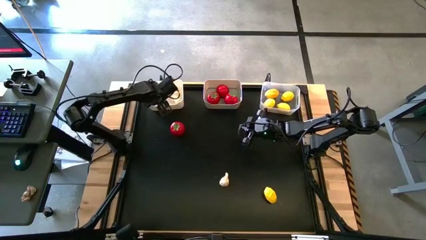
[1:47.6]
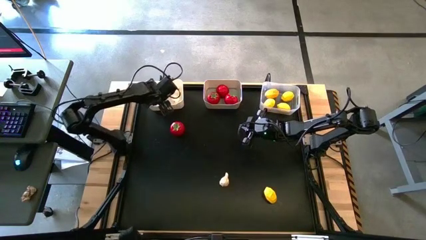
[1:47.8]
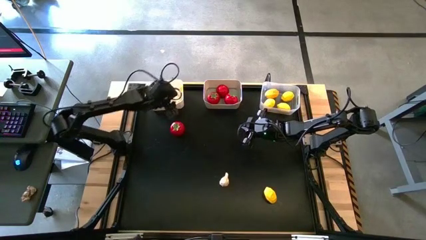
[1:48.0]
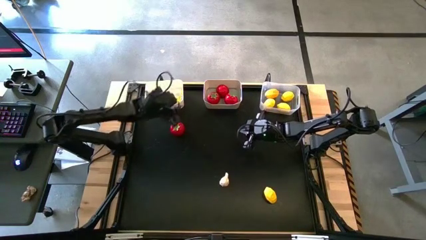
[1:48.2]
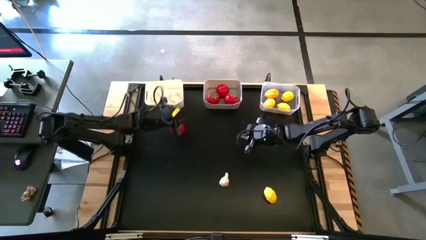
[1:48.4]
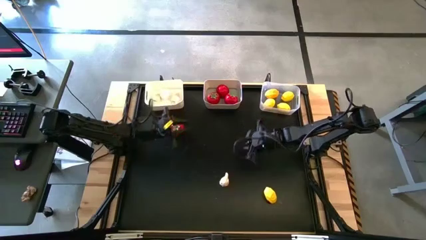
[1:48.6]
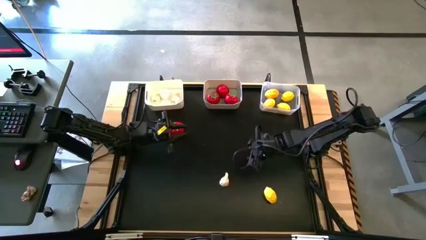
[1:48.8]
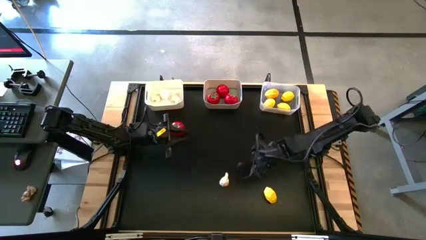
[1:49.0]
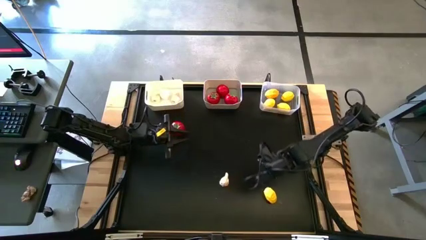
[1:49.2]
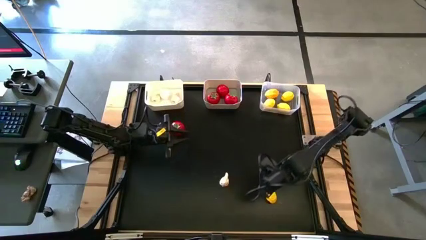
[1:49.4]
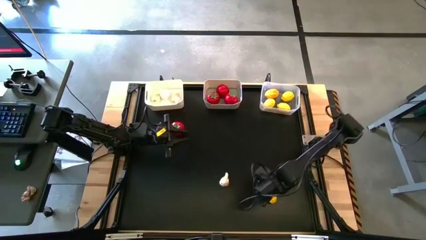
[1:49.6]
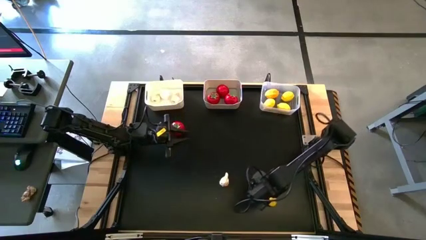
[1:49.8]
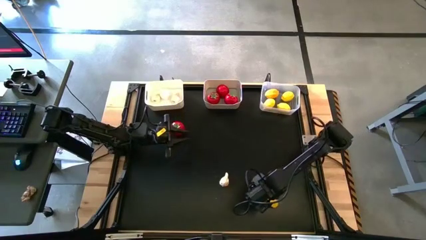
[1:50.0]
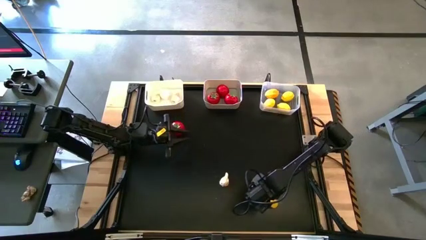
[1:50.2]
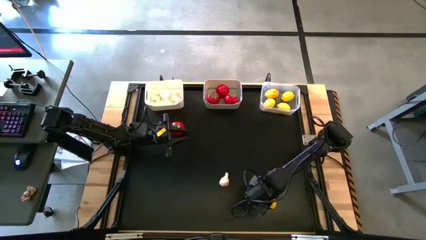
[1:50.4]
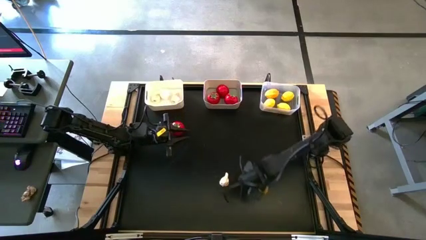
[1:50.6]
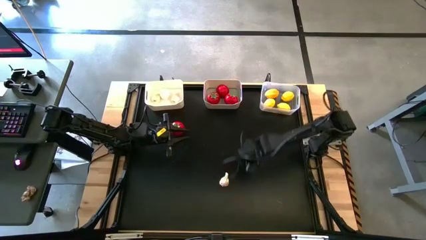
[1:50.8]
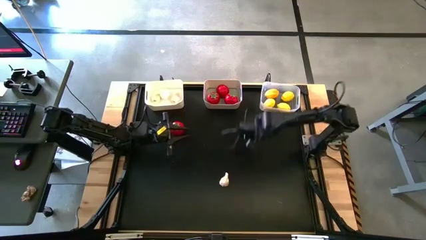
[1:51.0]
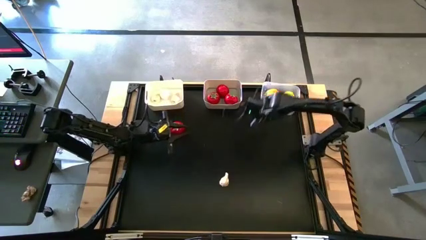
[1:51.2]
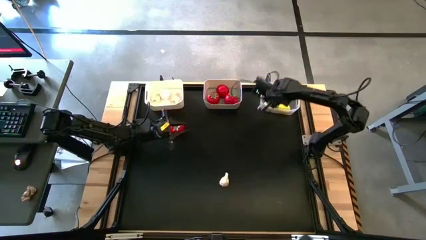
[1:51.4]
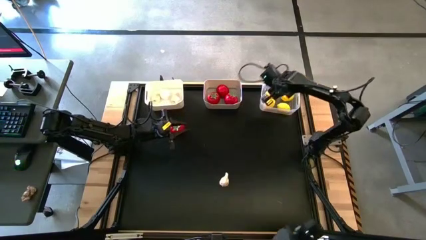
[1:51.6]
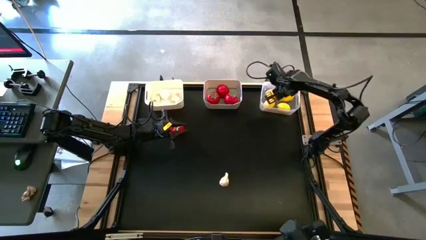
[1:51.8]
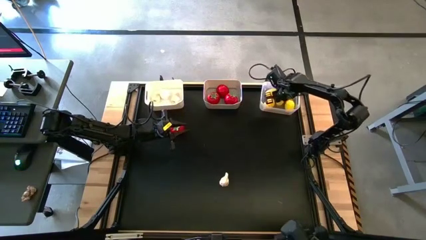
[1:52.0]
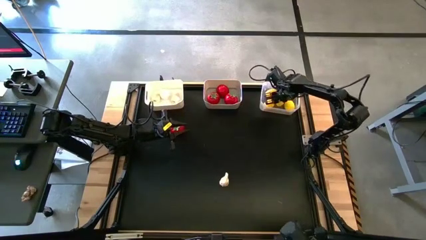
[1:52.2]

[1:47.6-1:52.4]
Task: Sort produce into baskets
Put the lemon into the transparent bin

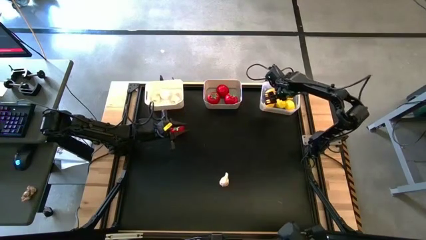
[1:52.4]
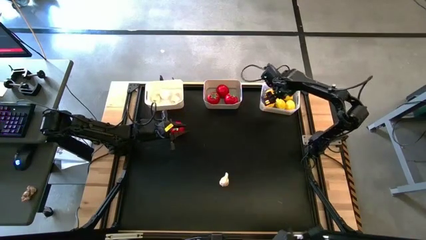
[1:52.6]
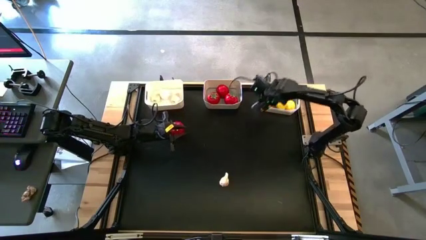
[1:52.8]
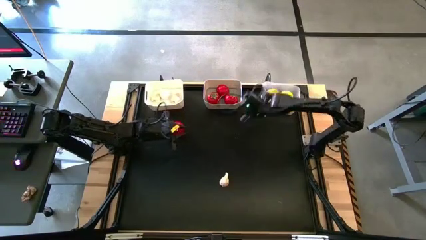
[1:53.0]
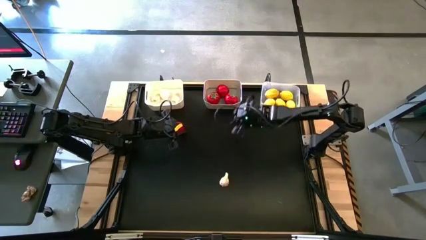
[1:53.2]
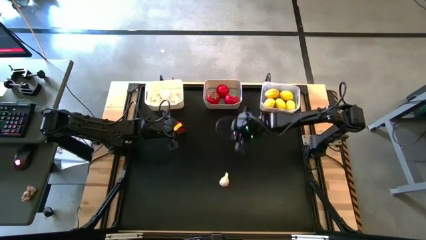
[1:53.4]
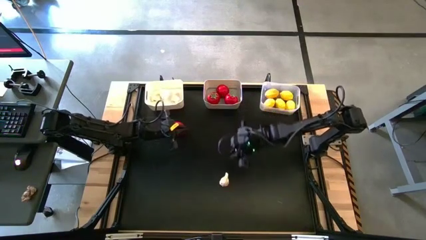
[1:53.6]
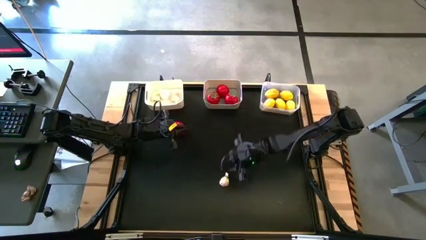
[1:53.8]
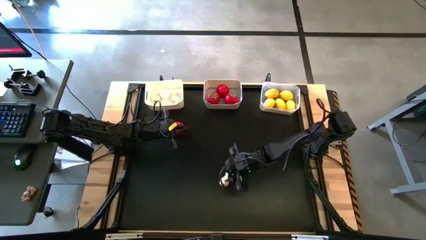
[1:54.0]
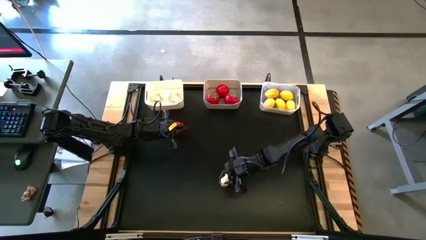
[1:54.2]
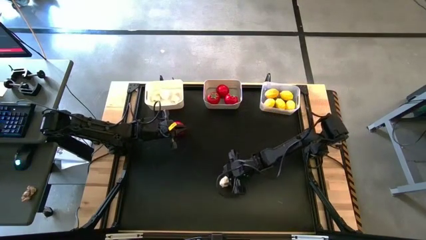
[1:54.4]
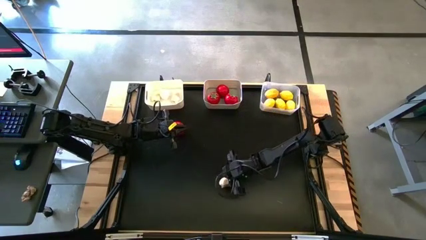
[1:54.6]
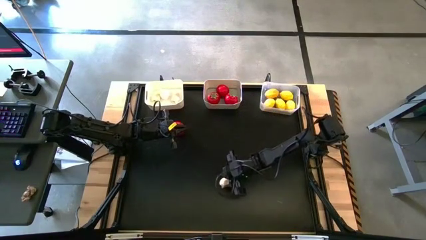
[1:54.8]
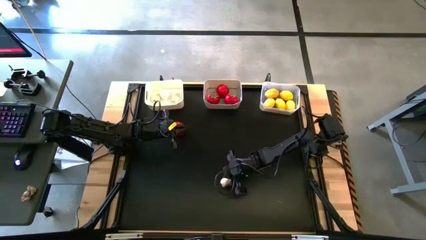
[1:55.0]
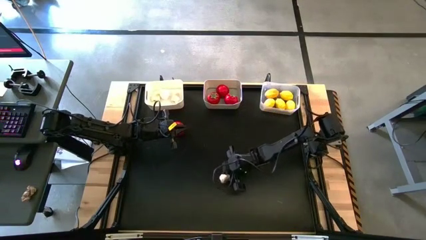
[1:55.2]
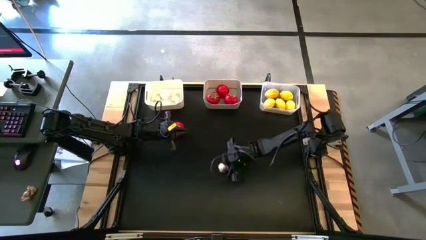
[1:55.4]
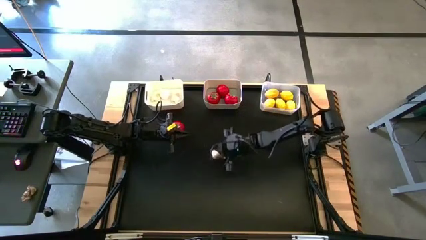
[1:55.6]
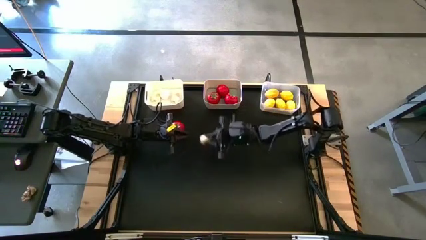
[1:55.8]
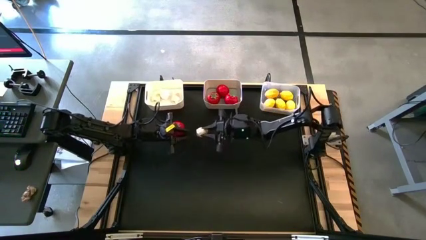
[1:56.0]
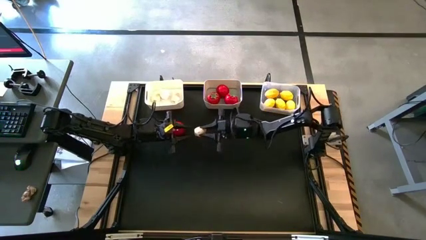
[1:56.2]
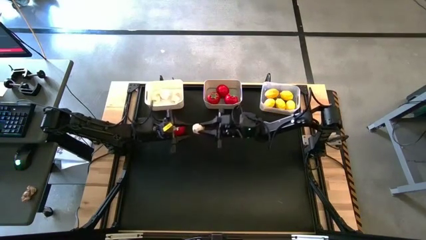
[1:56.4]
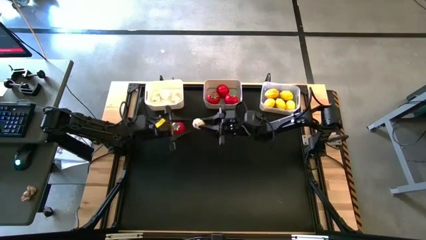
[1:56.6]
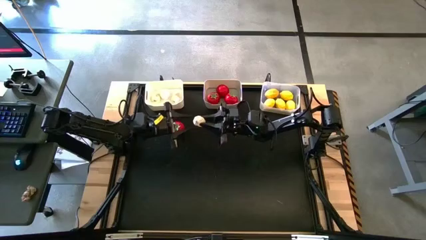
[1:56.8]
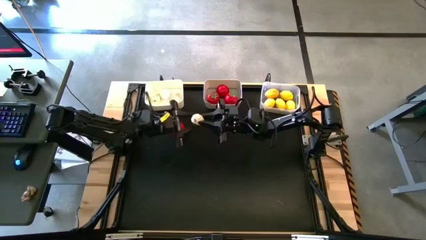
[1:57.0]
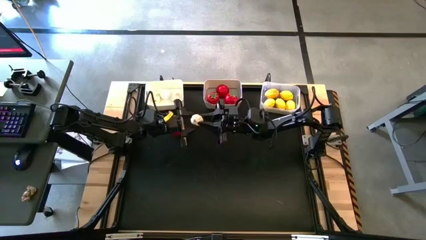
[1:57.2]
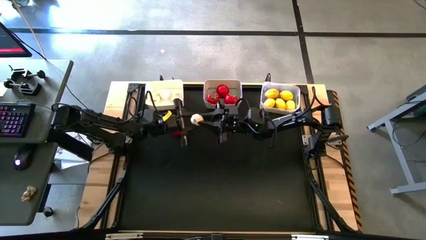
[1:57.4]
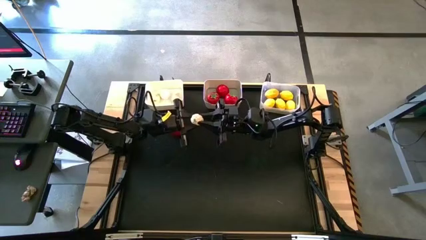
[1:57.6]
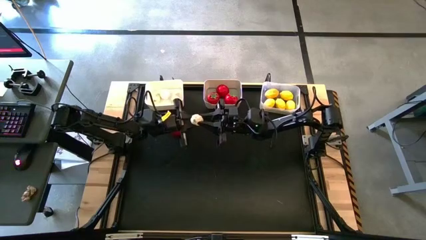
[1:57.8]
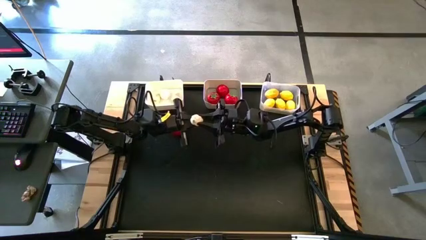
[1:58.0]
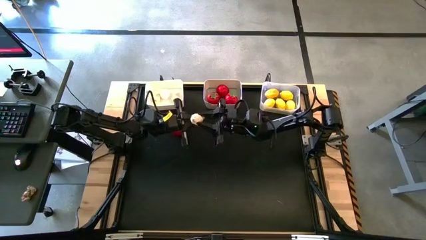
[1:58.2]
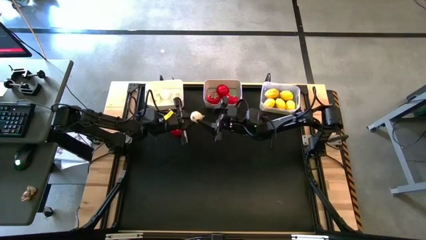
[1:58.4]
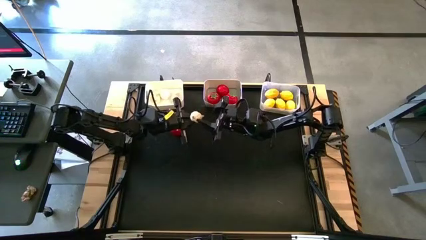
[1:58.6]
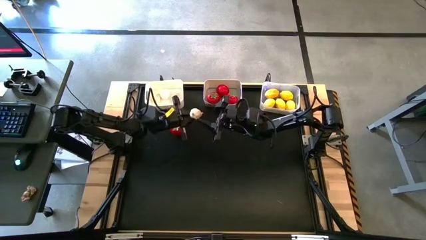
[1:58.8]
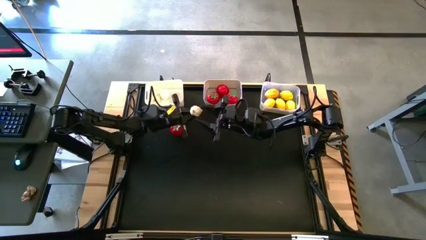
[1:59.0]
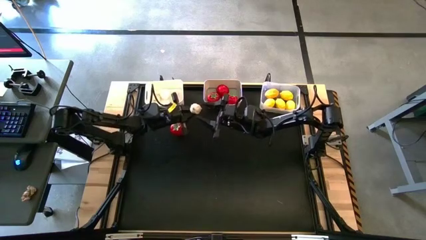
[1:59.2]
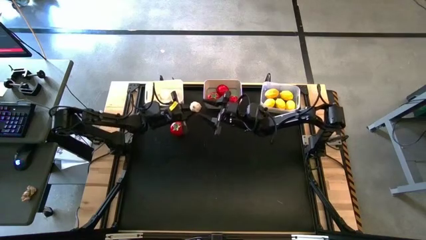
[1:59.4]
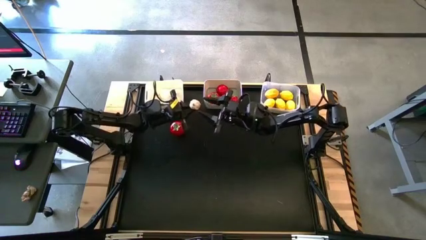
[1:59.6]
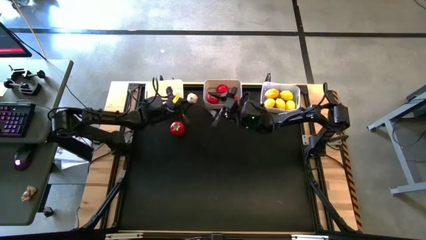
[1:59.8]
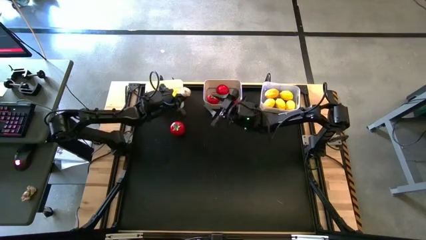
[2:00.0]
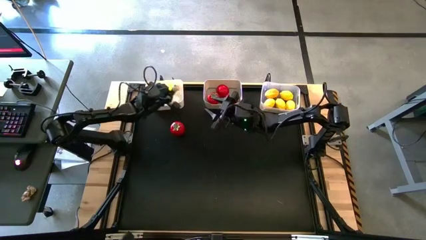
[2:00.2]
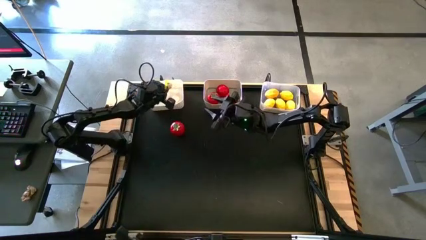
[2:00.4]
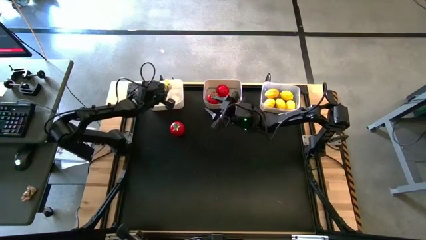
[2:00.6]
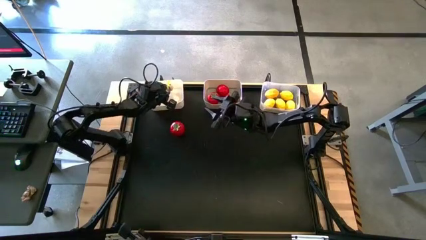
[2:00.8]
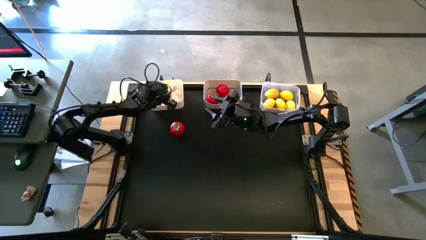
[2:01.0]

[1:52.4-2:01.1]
Put the garlic into the white bin

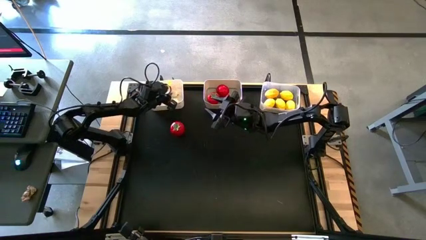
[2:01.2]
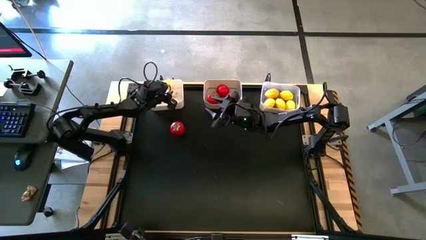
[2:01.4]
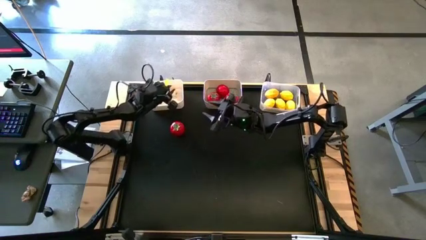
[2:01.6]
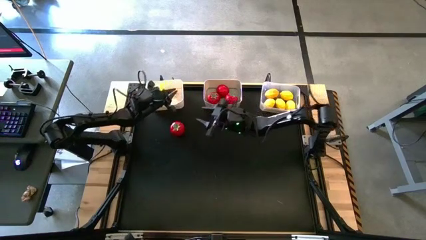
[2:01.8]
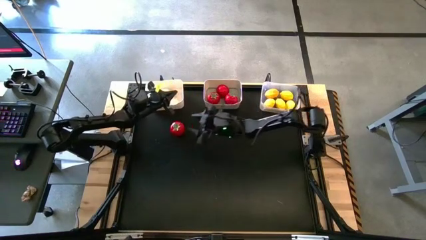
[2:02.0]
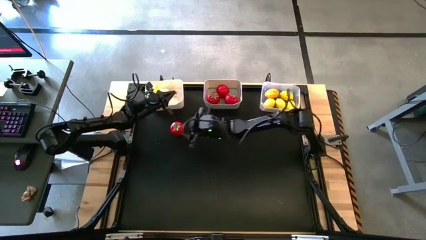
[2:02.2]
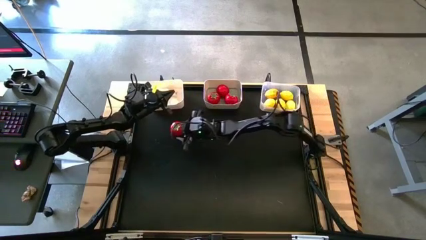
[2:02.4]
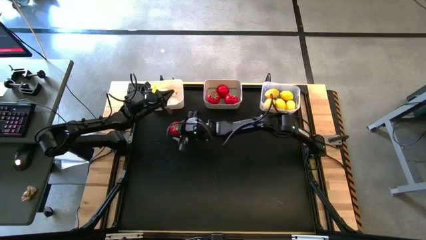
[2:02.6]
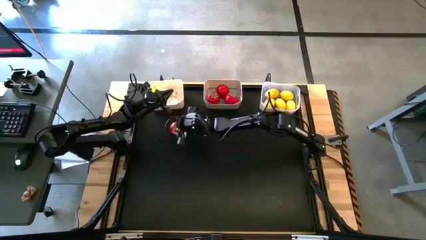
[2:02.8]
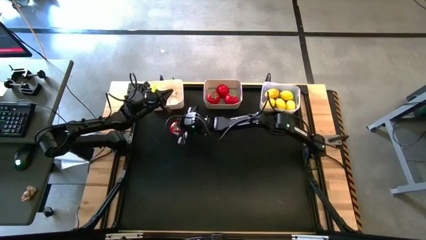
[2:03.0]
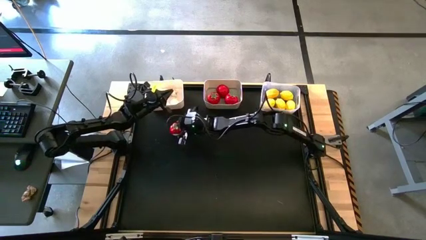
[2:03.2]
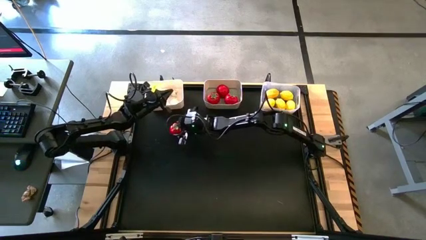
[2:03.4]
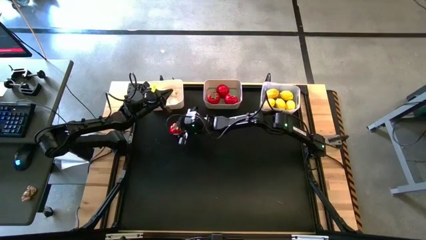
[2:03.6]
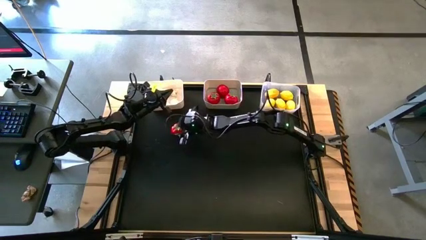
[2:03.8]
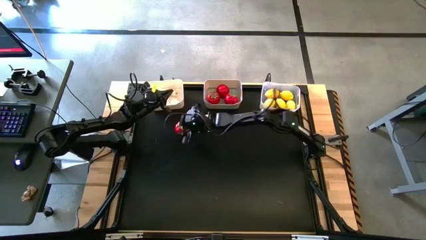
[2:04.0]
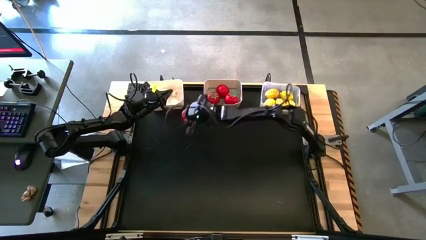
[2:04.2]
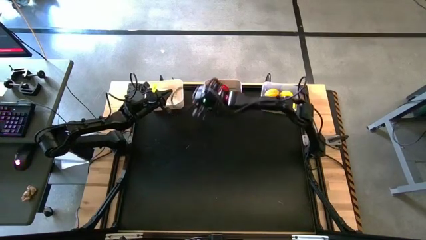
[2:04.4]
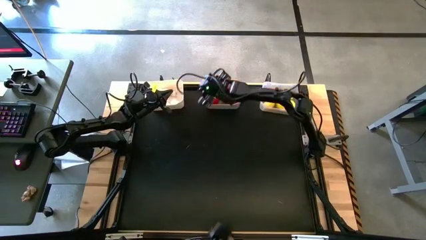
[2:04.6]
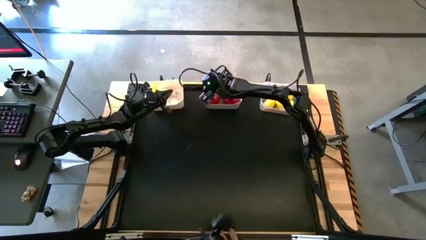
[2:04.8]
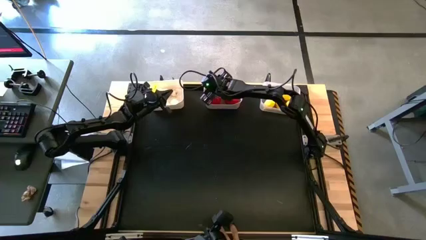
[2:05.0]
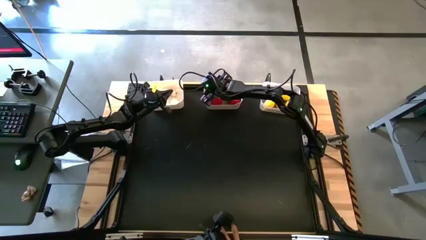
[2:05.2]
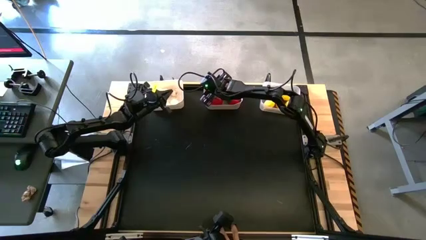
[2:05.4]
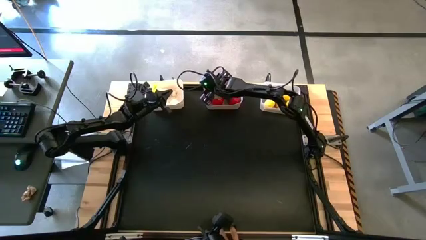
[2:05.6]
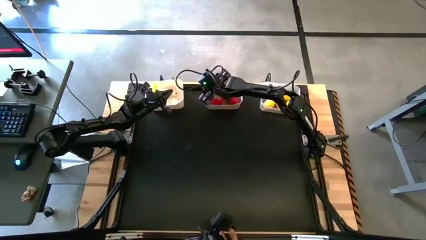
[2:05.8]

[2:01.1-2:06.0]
Put the tomato into the gray bin
